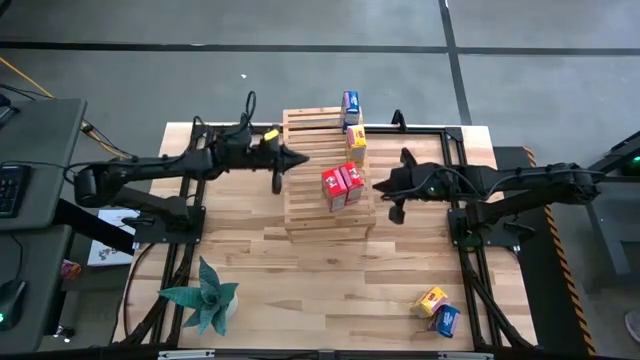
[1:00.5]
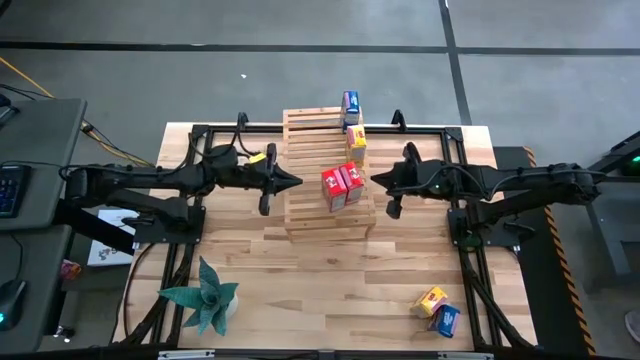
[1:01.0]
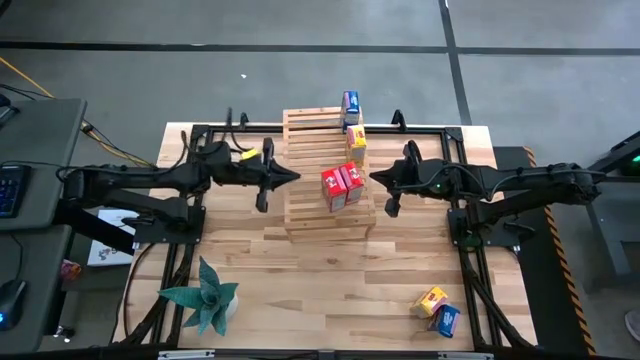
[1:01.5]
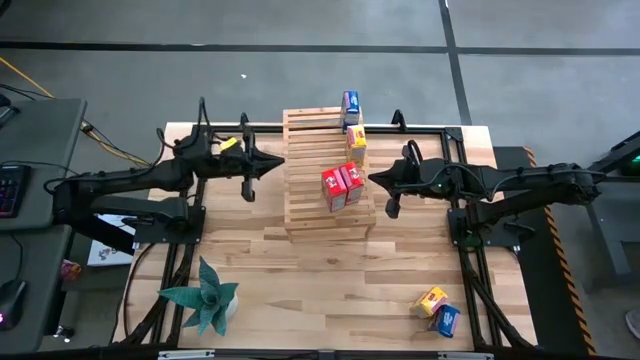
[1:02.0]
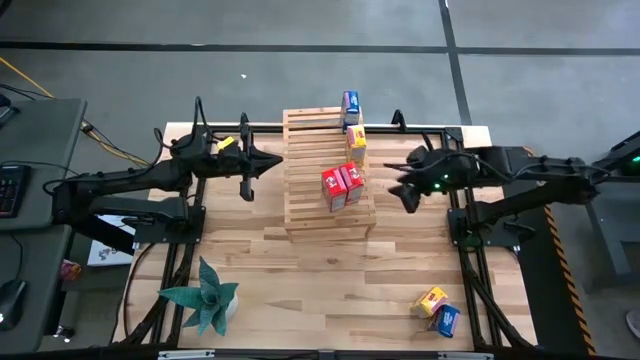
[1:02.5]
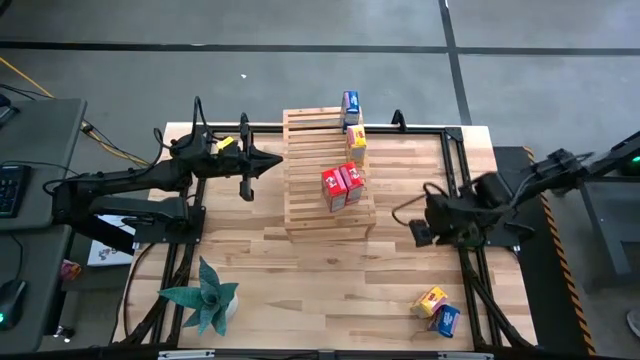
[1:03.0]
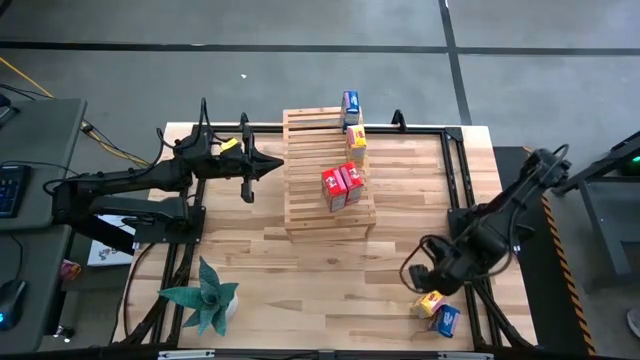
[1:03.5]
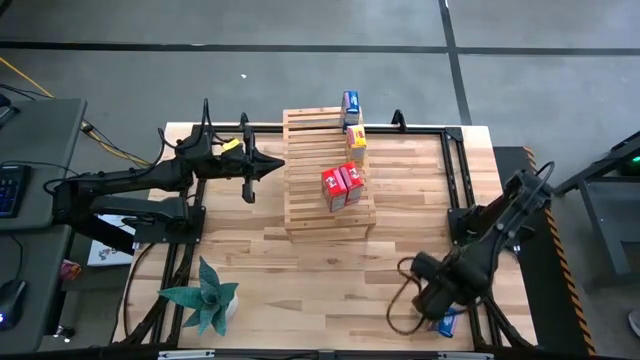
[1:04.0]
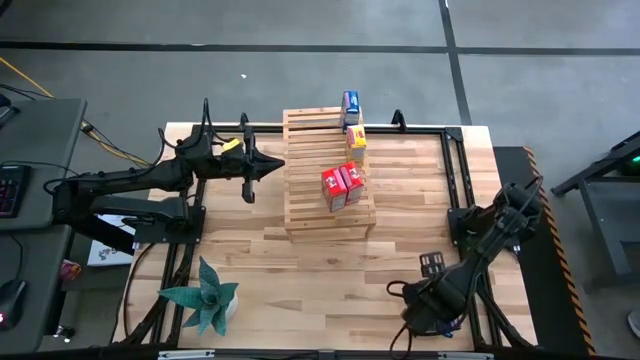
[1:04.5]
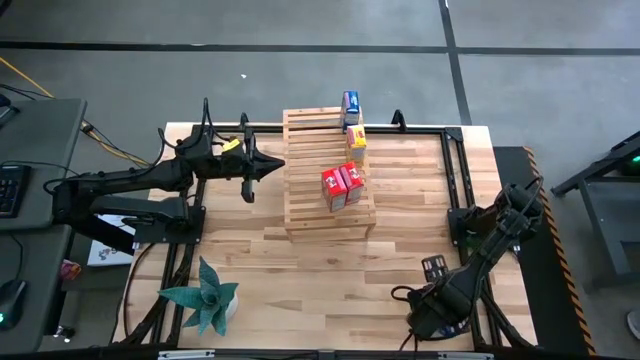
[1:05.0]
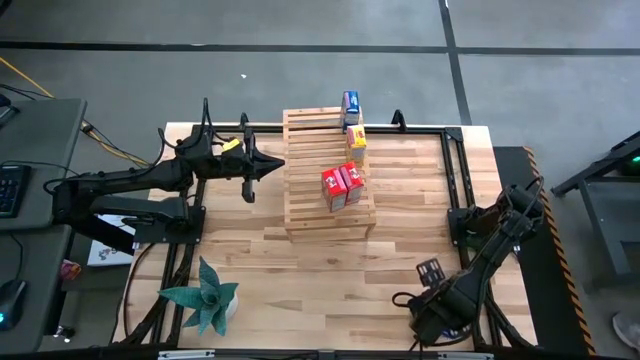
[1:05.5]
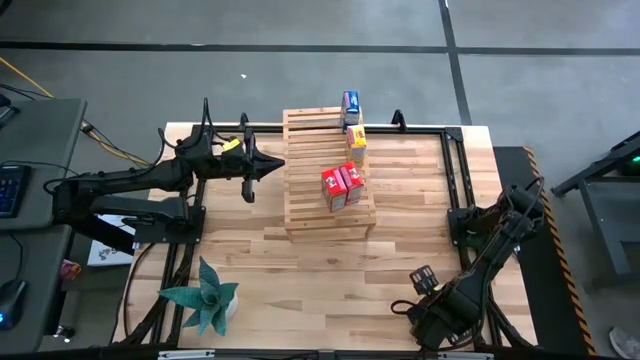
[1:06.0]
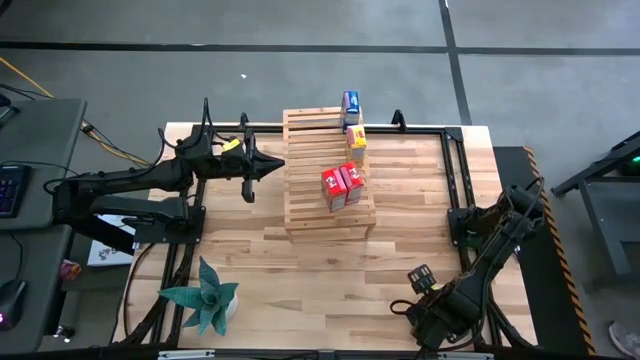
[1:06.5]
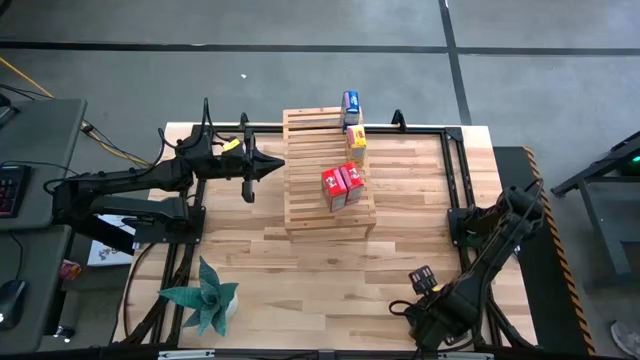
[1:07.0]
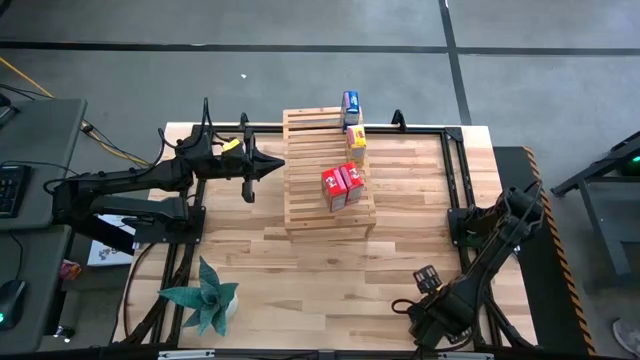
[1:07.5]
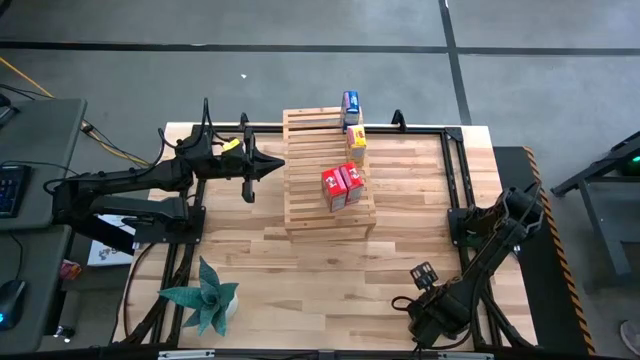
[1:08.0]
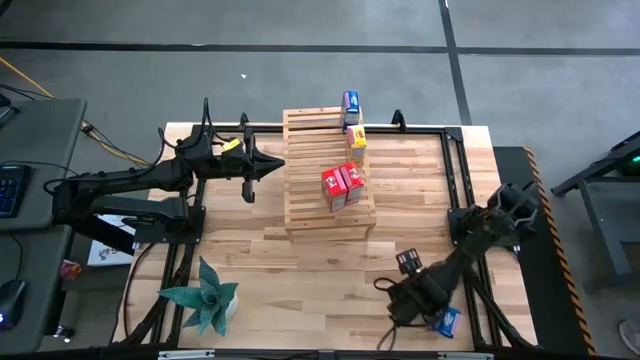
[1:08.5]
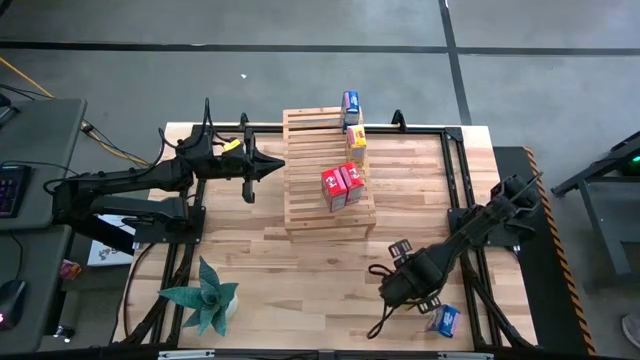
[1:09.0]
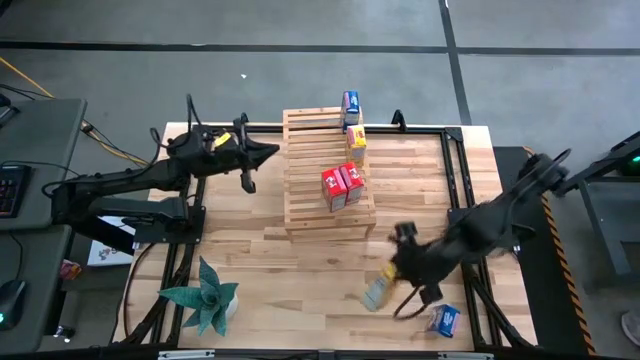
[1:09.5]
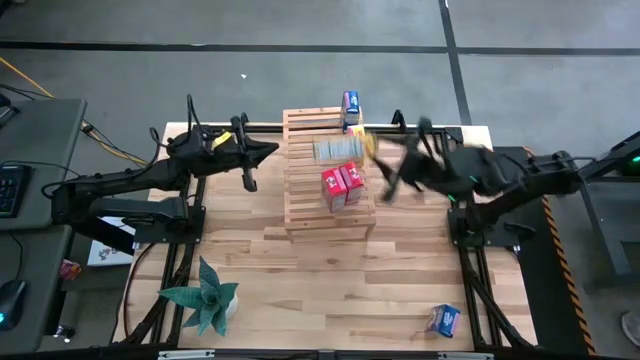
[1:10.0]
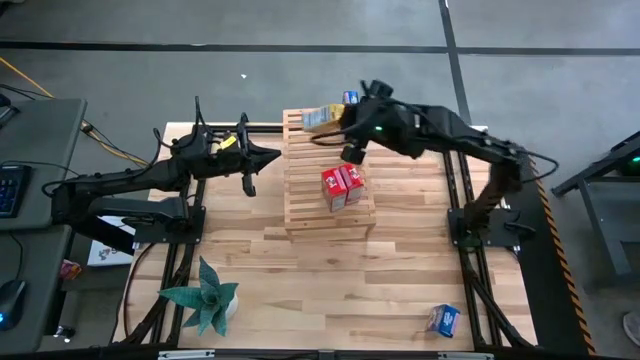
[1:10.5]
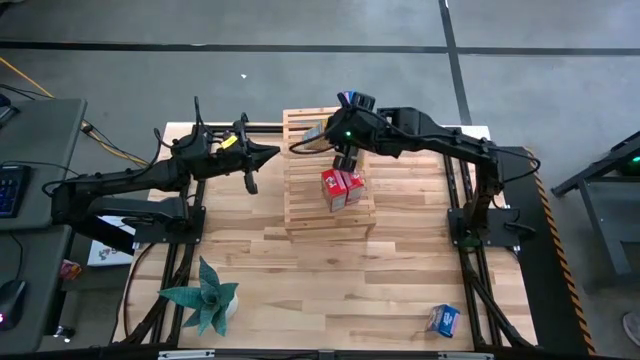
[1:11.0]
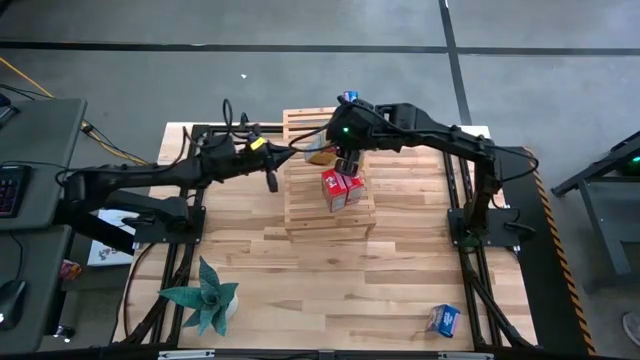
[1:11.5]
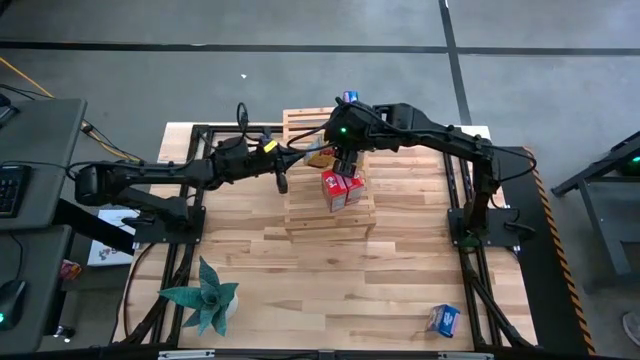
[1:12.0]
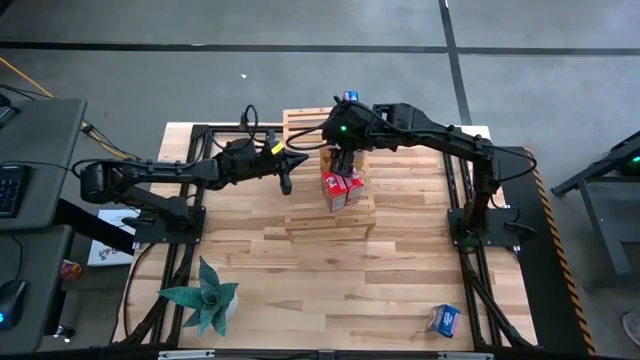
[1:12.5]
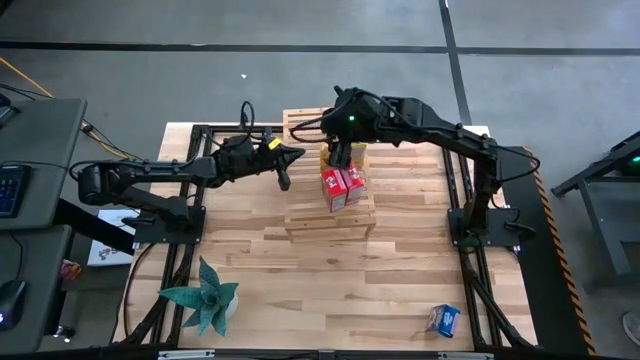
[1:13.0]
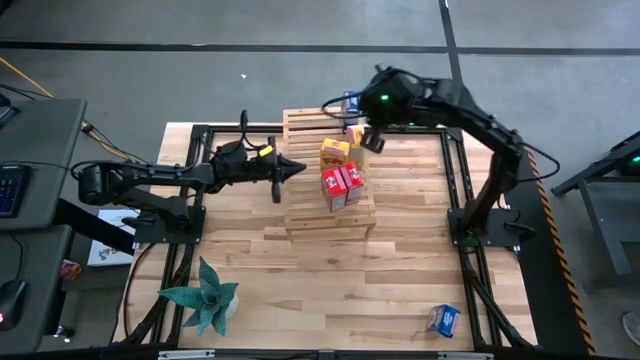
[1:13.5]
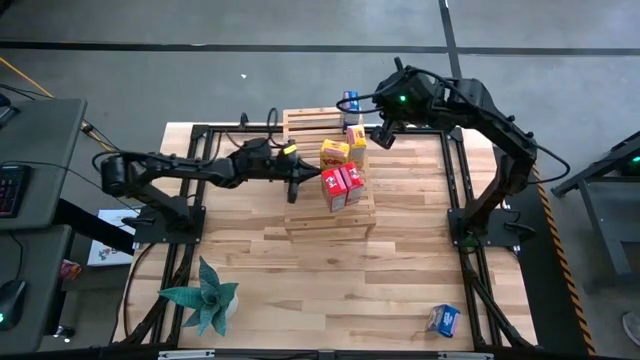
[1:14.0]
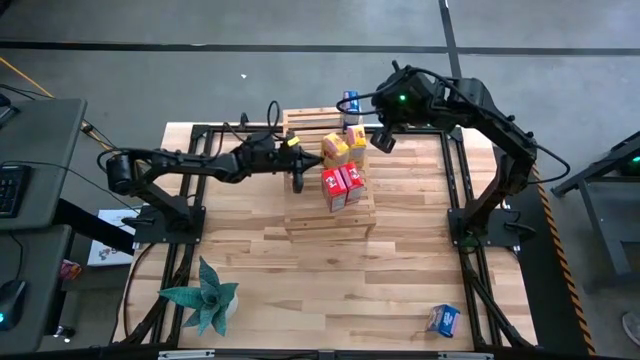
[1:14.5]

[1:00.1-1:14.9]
Task: Stack cereal on shelf
Put the yellow cereal box on the shelf aligned with the other yellow cereal box

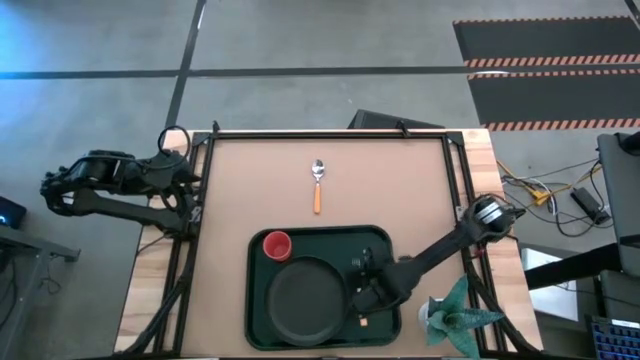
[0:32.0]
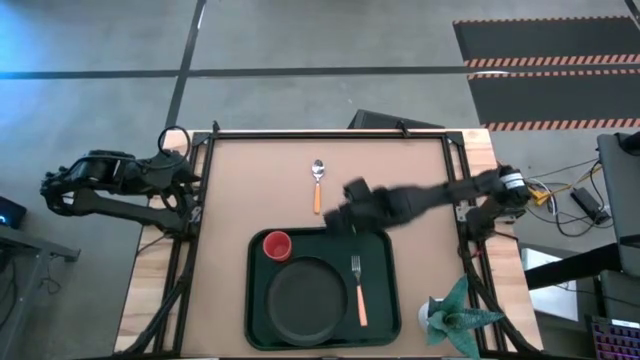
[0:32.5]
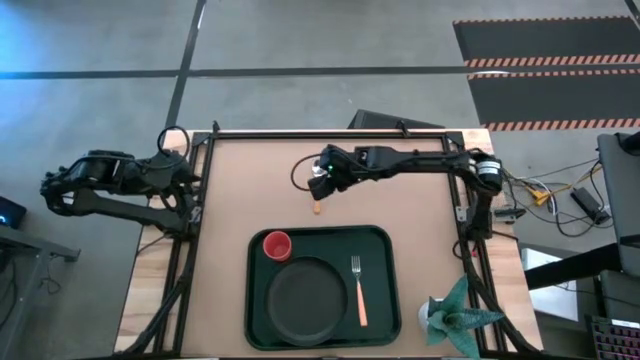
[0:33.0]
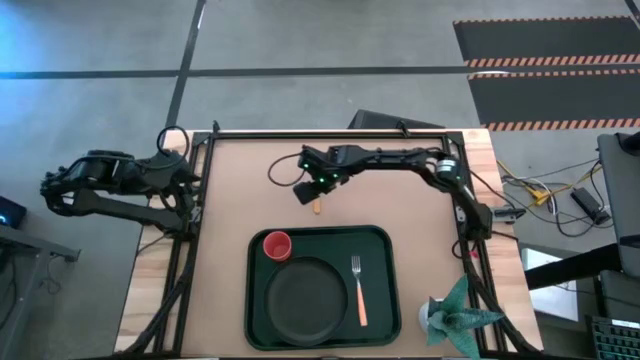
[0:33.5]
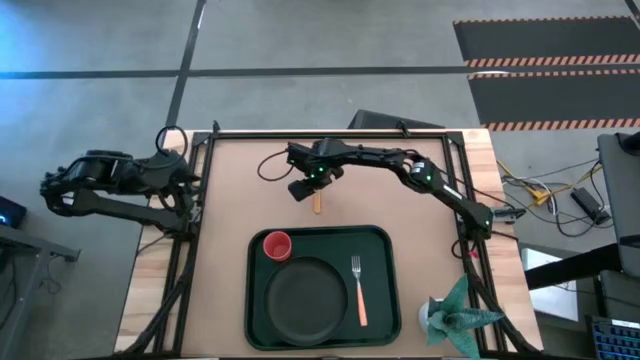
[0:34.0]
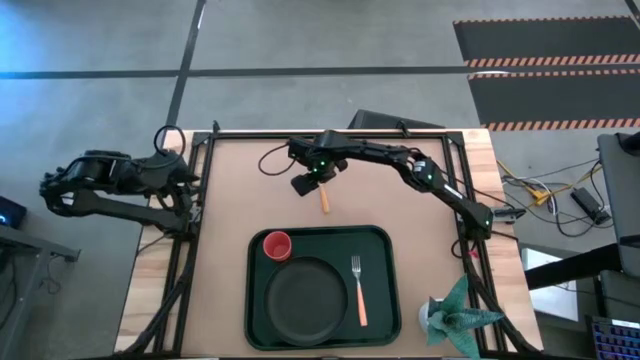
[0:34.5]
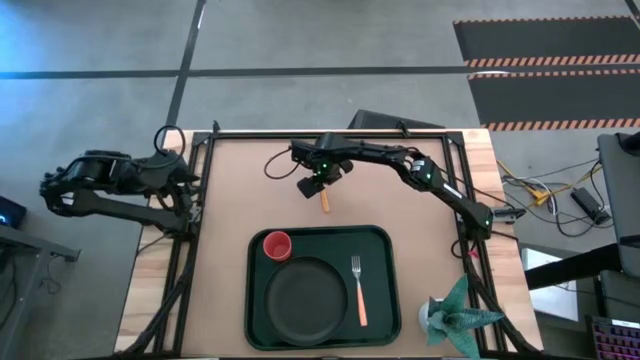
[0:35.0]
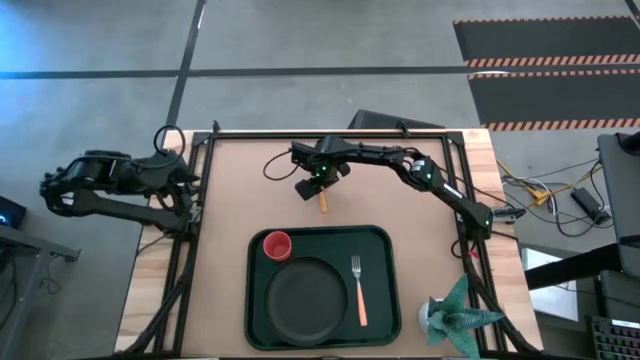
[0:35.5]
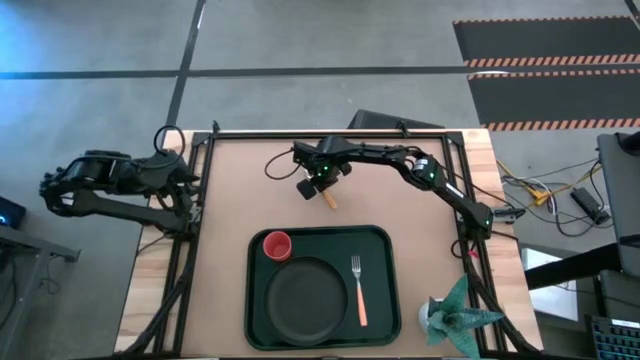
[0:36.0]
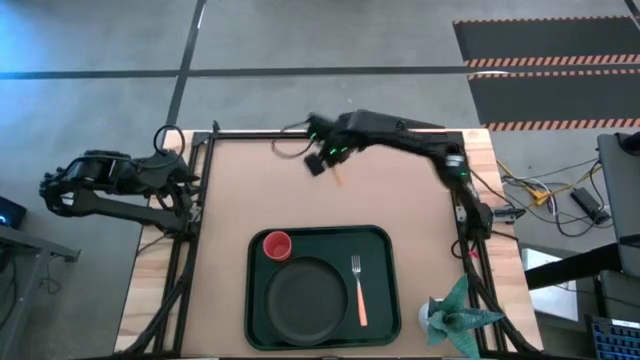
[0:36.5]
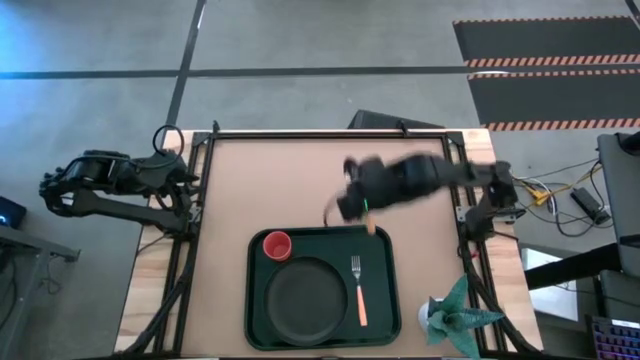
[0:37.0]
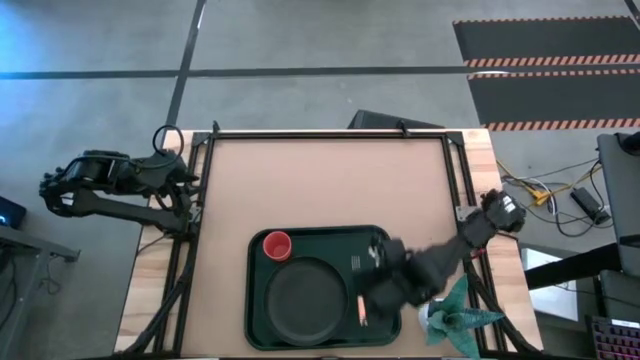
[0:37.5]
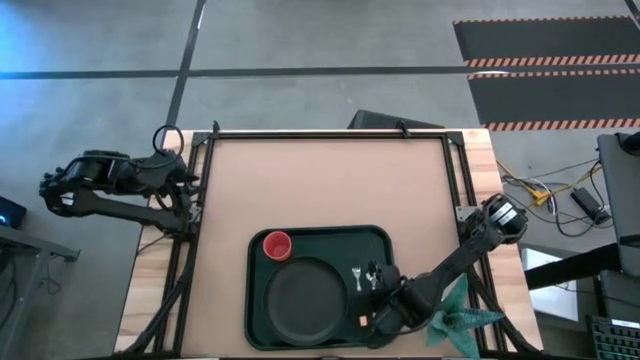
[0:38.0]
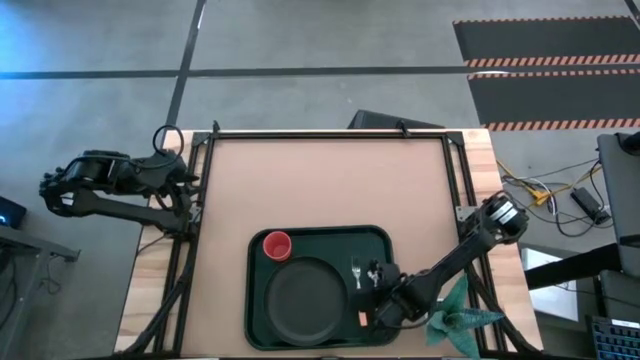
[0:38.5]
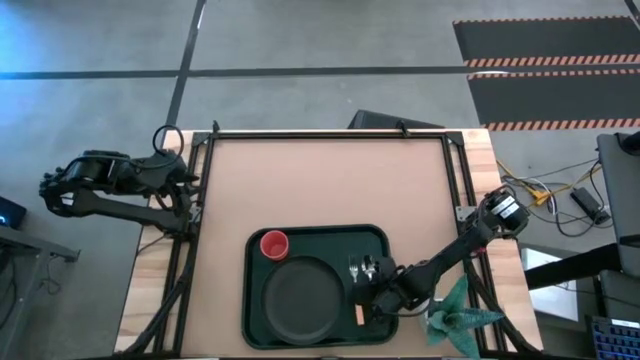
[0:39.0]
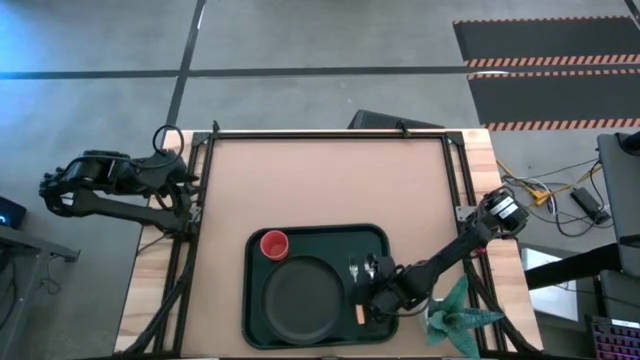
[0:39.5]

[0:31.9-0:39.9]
Task: Pick and place plate/cup/fork/spoon on tray
Put the yellow spoon on the green table tray
